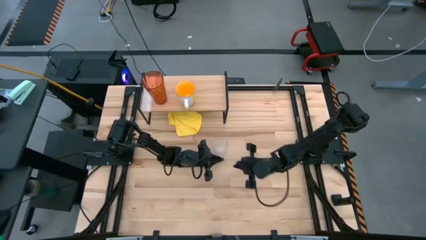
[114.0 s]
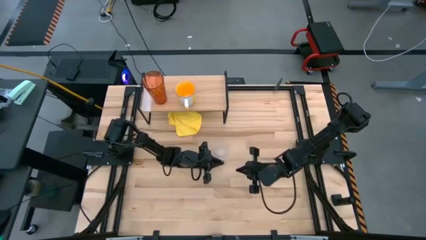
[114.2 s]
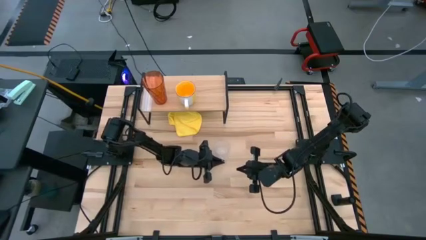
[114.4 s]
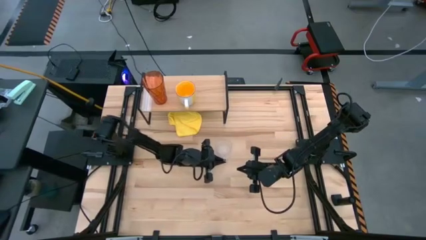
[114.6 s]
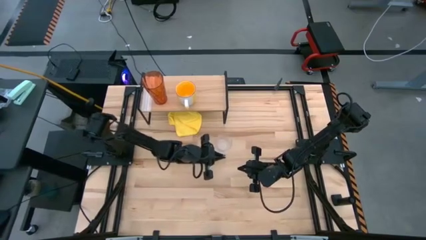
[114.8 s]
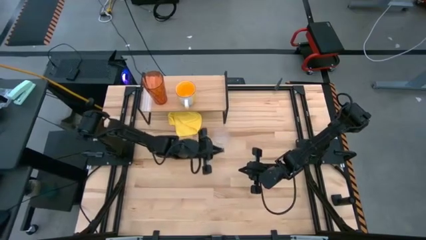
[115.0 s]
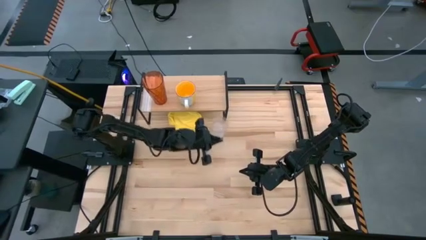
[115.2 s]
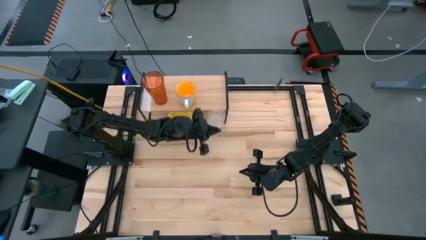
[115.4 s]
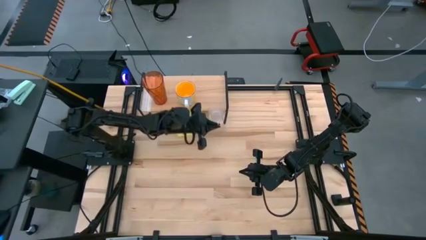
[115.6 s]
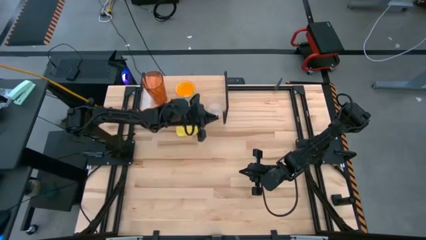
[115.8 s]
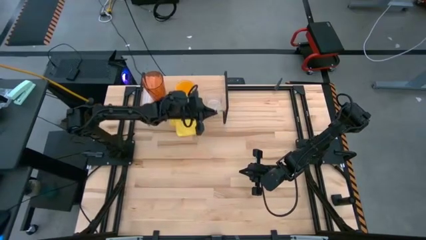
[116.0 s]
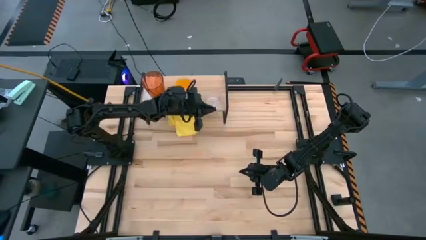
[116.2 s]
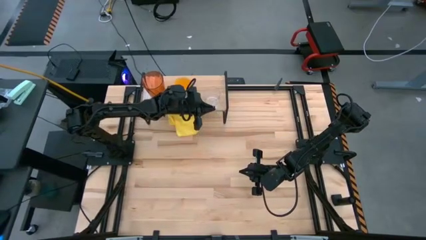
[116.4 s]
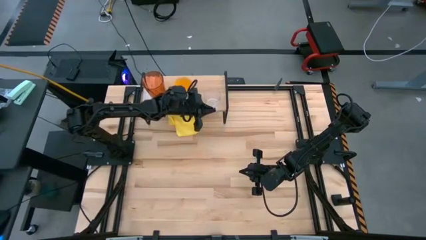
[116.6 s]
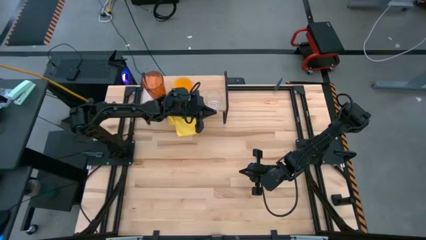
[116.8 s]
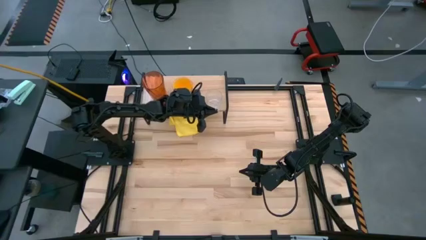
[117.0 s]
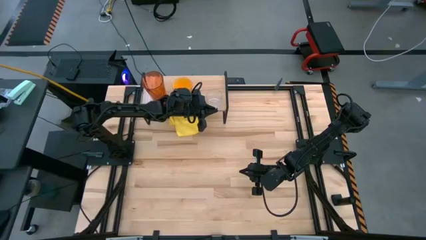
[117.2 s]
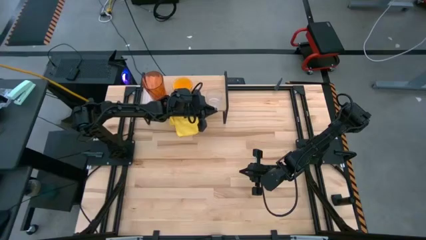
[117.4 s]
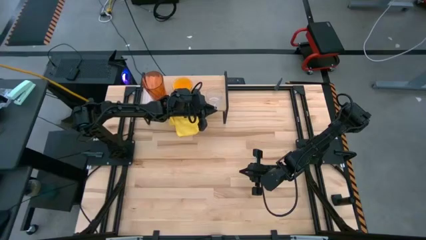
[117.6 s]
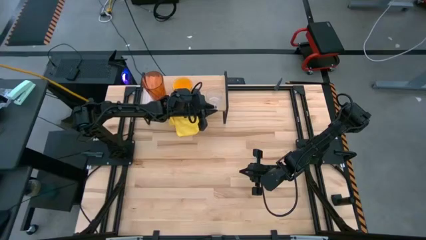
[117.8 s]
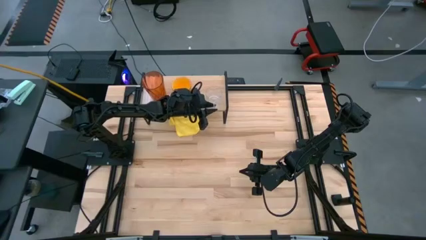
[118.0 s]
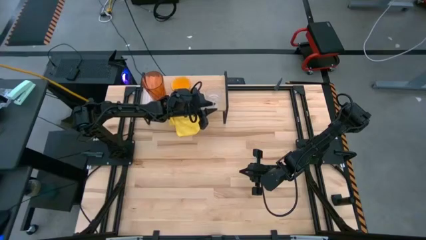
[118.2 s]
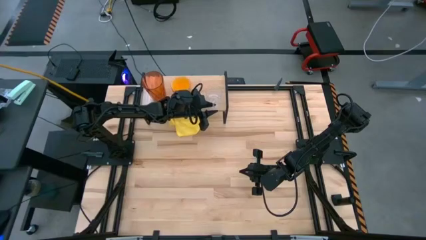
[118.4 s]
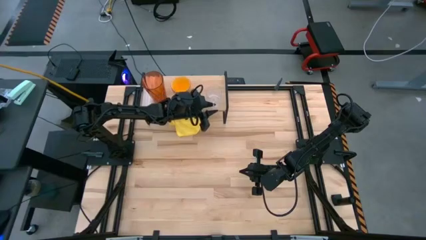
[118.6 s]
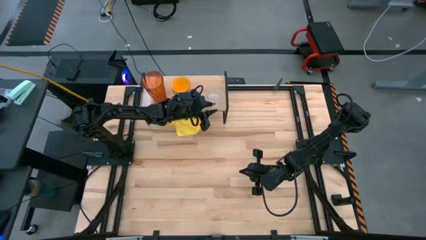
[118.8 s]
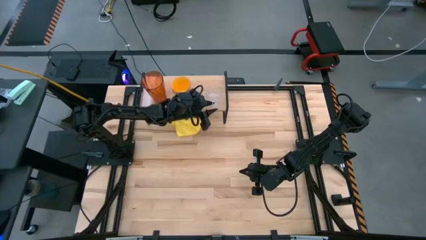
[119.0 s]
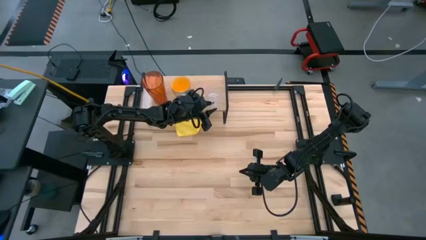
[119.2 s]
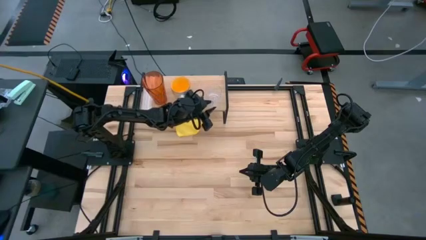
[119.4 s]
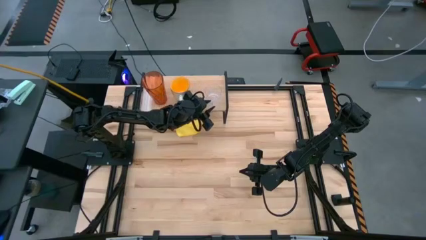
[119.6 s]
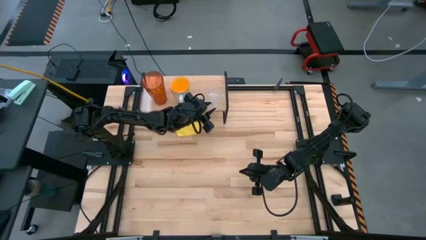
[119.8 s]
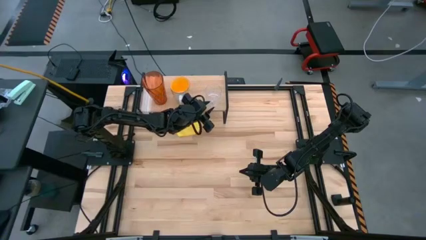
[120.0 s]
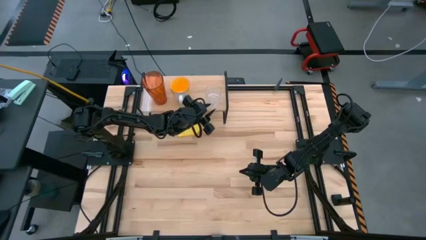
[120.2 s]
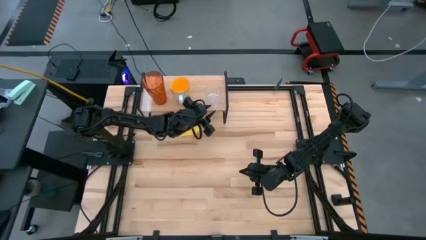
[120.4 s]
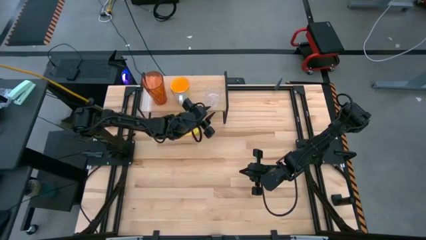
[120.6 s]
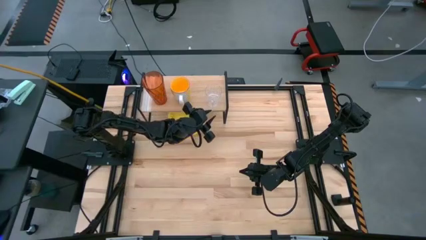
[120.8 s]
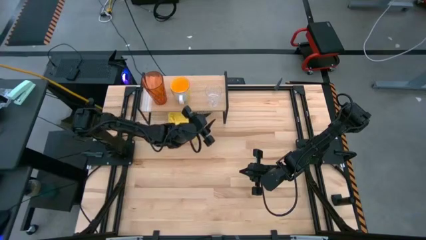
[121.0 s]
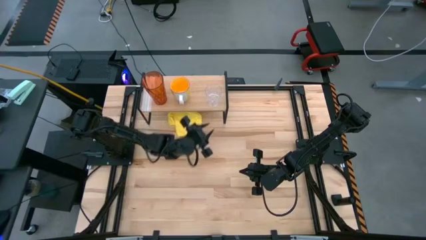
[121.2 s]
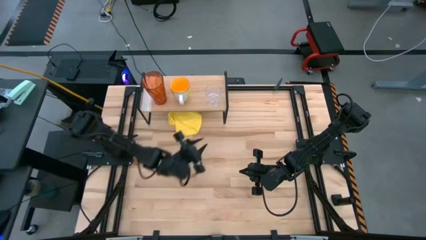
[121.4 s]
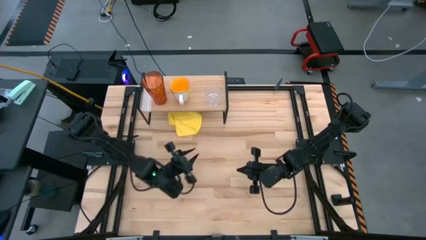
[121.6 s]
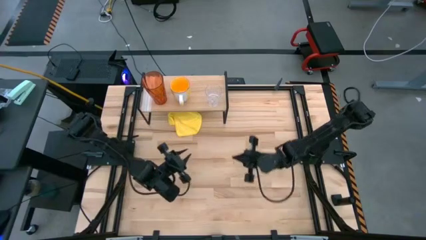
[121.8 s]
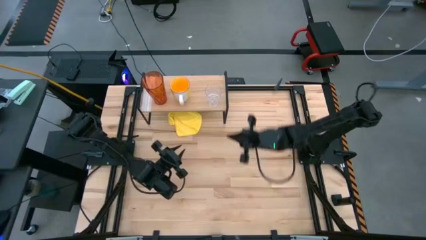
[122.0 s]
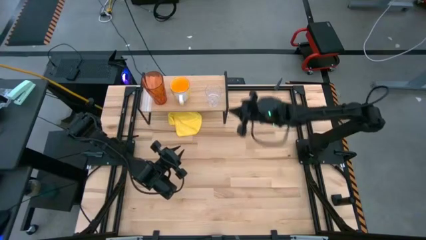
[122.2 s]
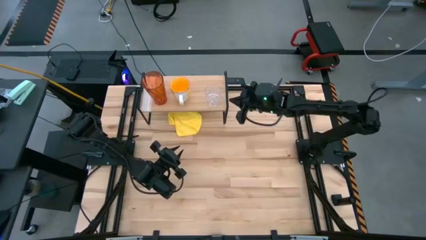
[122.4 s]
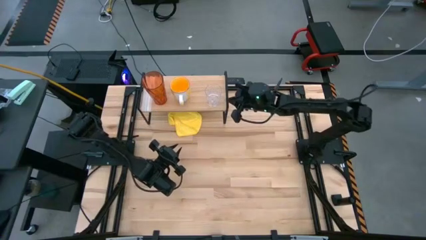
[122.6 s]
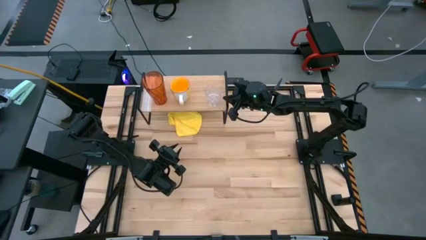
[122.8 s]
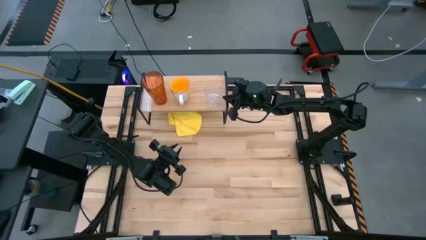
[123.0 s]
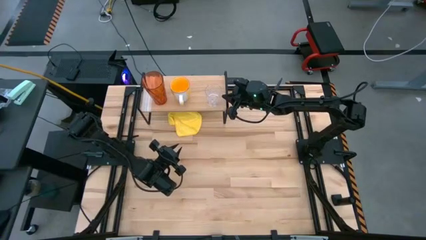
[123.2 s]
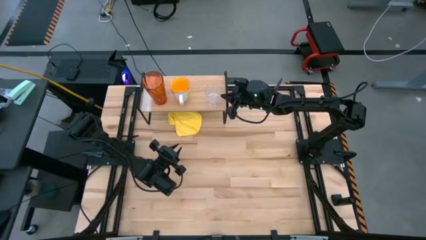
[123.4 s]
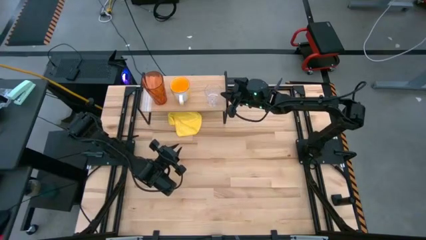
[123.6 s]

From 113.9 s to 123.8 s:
Task: Stack small to large cups/mugs on shelf
Put the transparent mug on the shelf

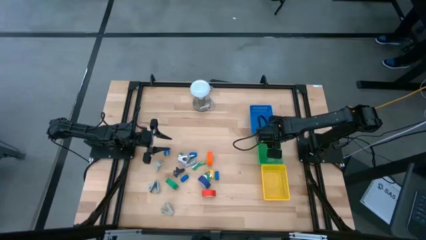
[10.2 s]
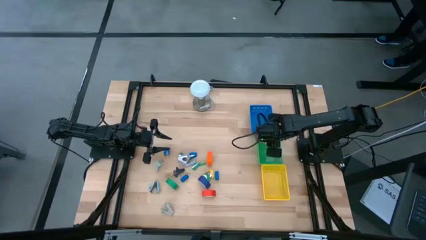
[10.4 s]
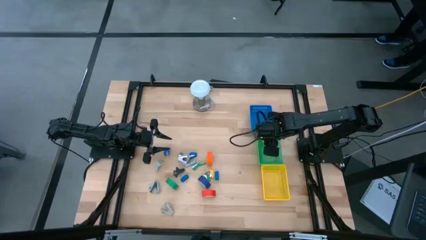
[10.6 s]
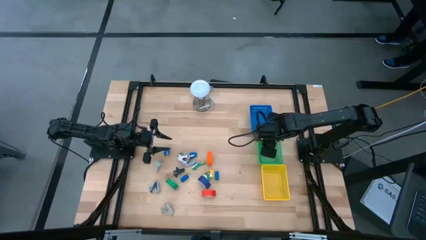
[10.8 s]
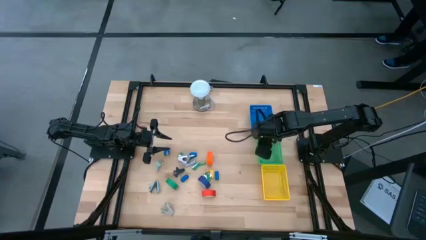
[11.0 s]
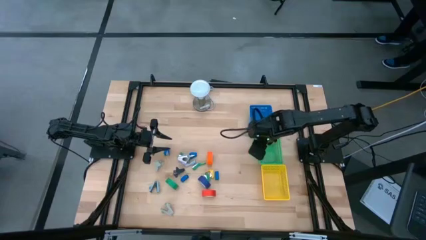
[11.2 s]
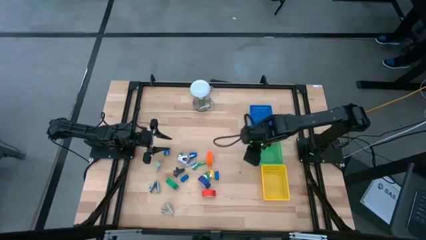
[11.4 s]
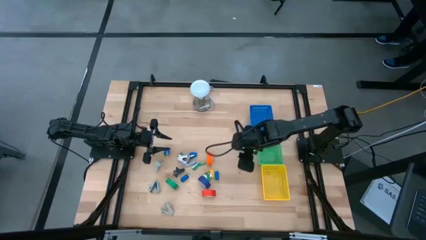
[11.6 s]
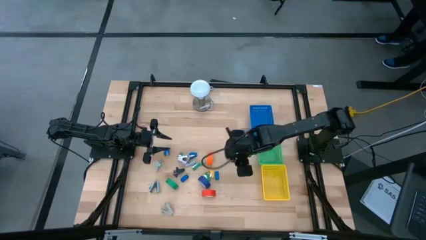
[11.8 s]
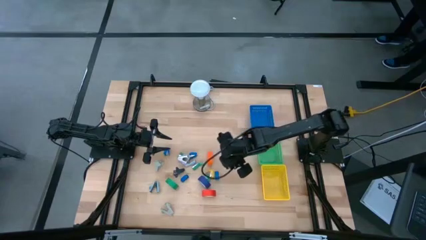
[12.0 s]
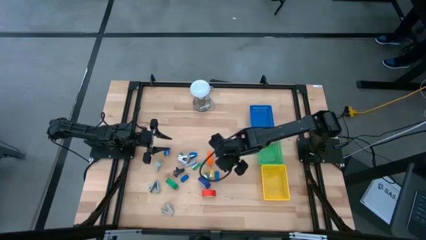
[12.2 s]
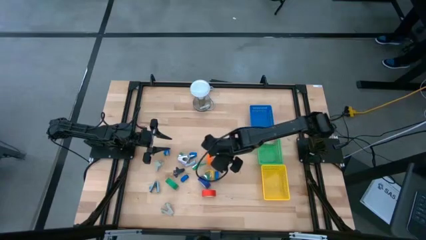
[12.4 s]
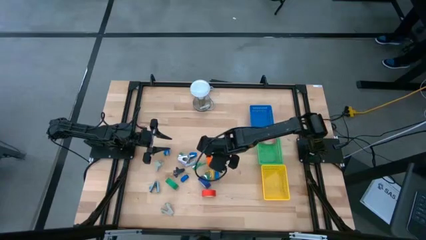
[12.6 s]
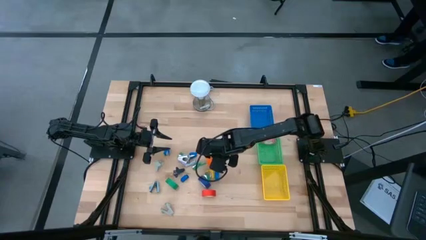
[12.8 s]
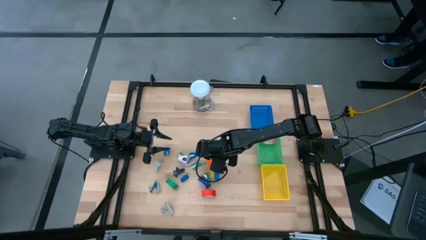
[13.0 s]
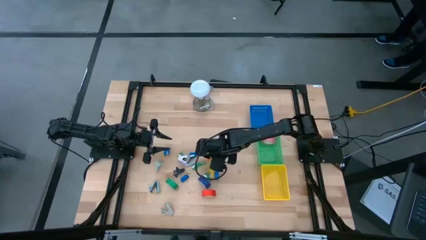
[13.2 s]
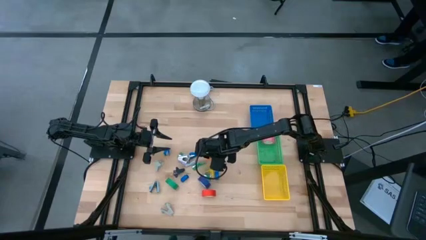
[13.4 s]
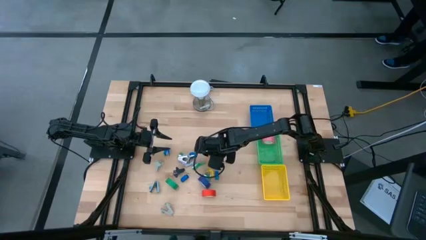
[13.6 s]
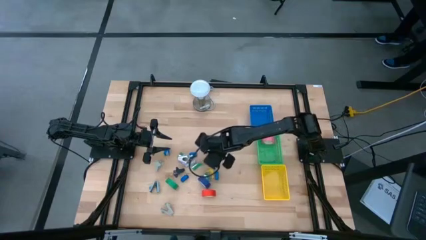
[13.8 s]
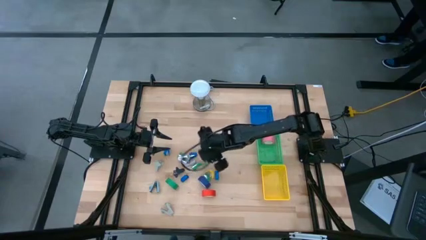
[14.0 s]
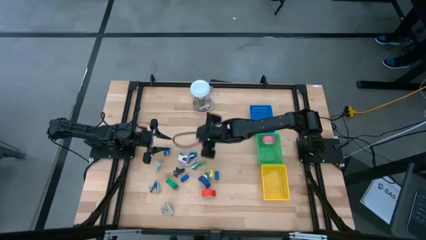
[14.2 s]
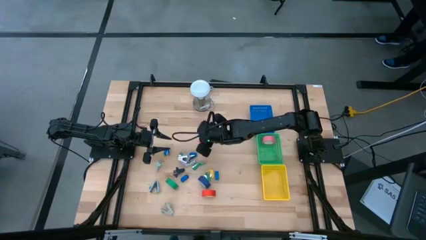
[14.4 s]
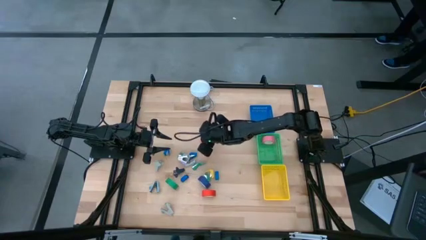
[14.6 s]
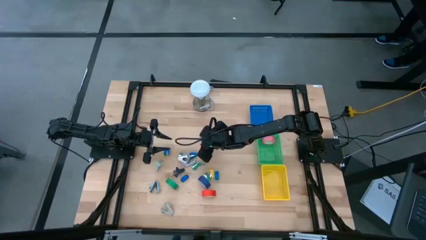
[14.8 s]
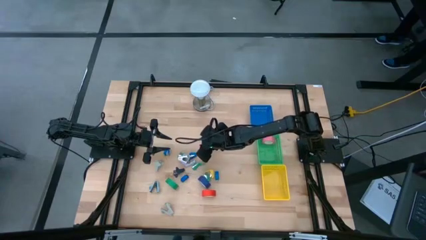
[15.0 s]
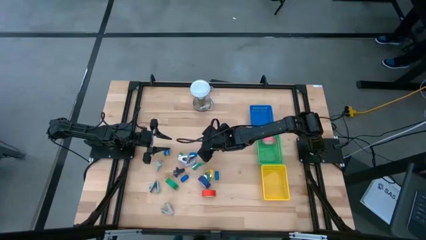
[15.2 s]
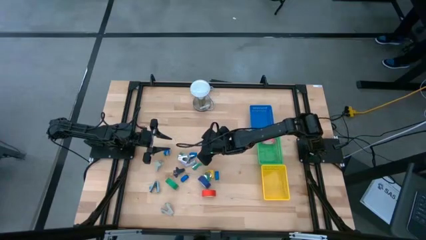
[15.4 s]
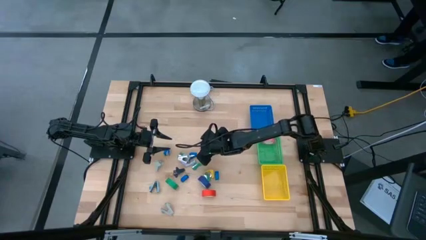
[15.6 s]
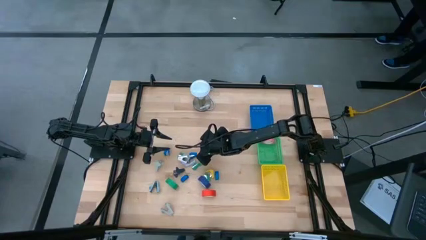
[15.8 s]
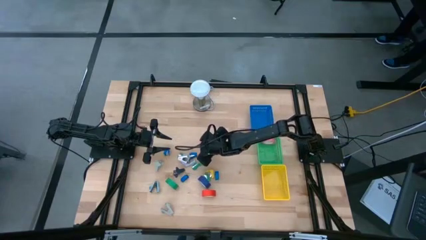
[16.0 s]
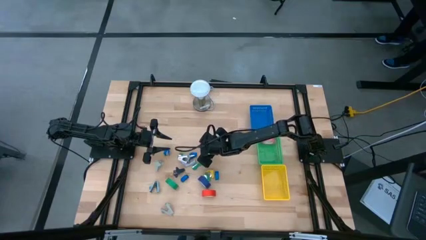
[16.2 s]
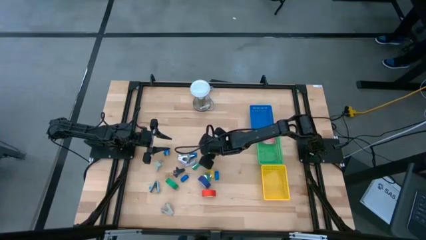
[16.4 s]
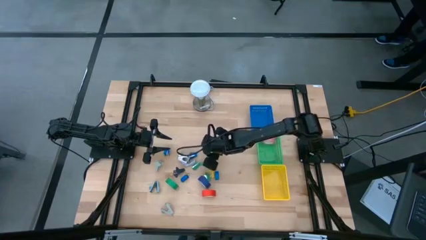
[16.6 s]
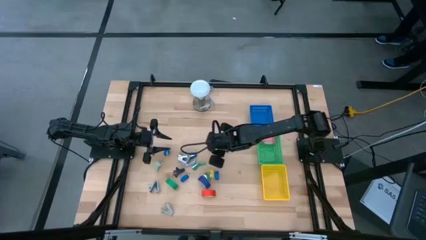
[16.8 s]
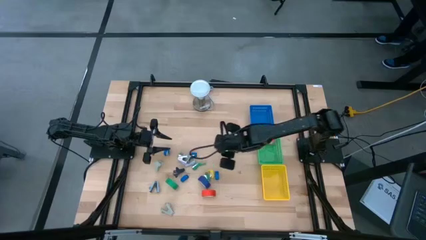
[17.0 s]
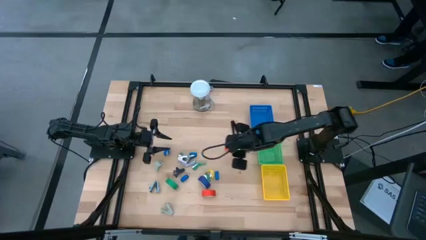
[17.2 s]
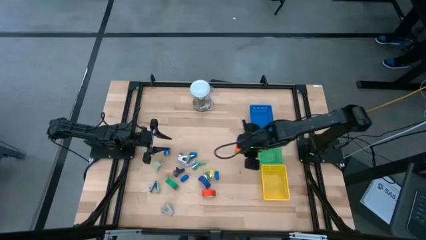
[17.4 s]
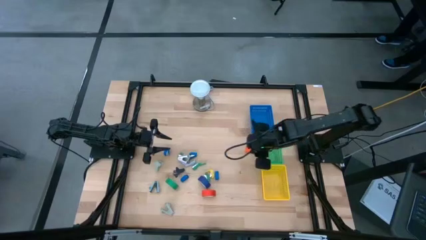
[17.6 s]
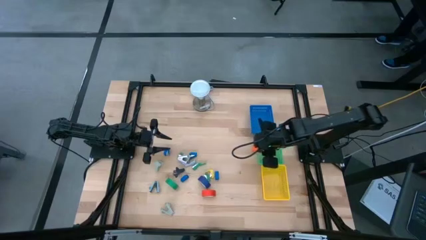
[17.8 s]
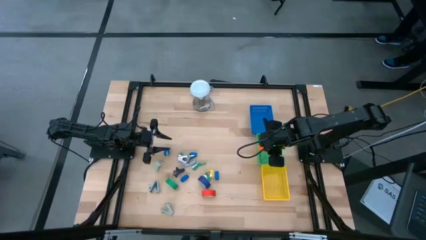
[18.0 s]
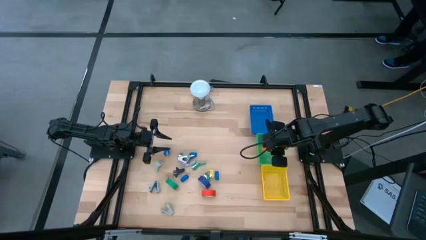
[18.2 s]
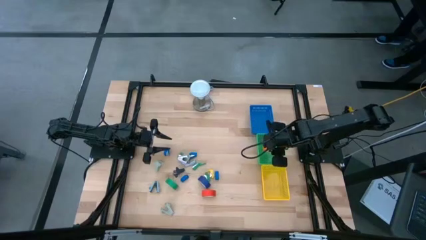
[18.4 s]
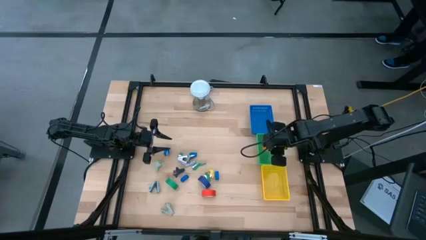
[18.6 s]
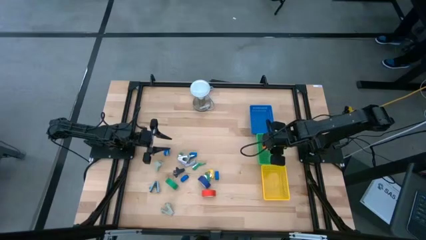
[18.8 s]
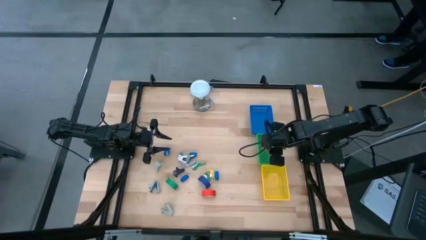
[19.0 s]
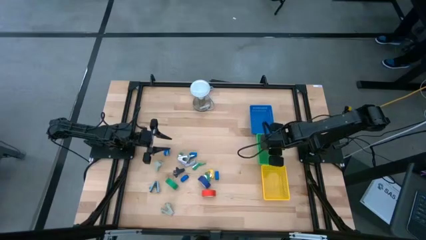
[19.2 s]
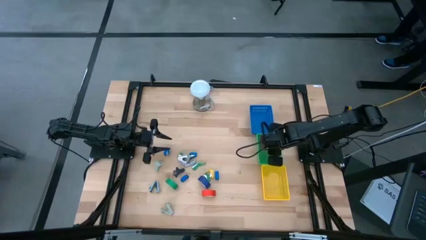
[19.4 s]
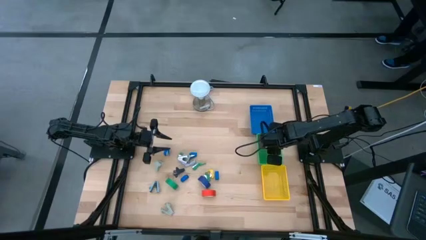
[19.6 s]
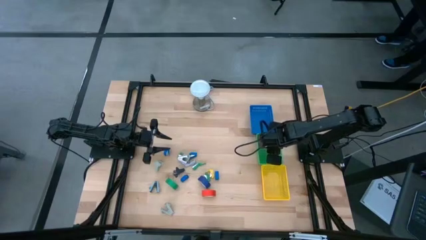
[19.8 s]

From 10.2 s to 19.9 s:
Task: Pick and place Stapler, Stapler remover, tape
Put the orange tape into the green bin
